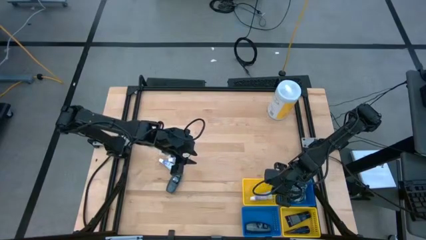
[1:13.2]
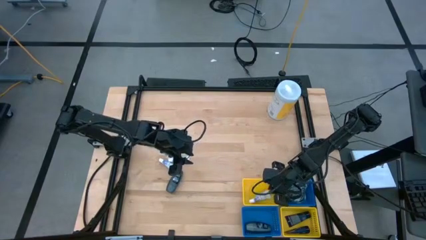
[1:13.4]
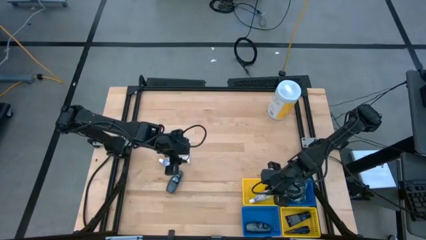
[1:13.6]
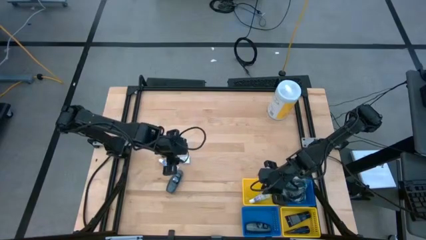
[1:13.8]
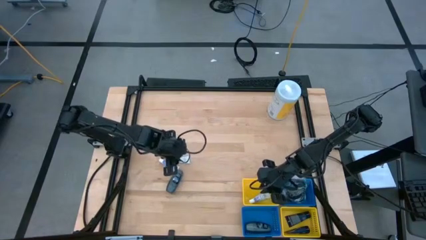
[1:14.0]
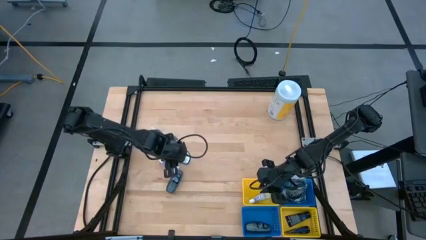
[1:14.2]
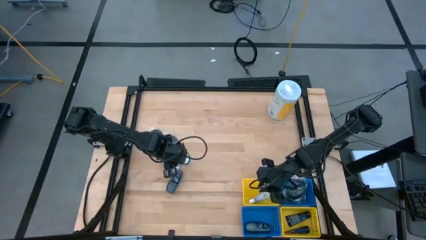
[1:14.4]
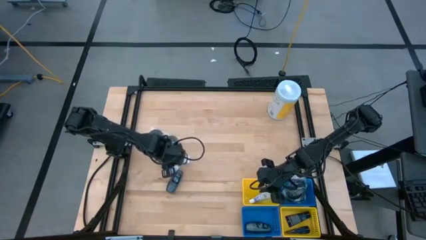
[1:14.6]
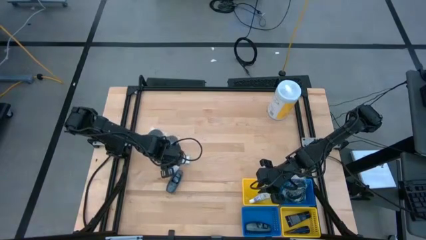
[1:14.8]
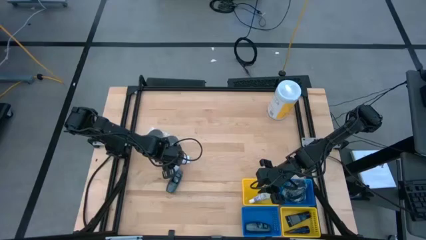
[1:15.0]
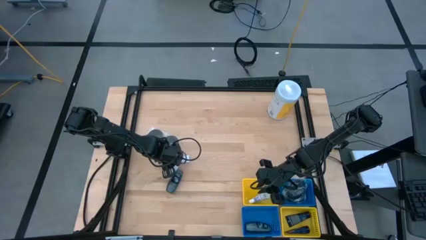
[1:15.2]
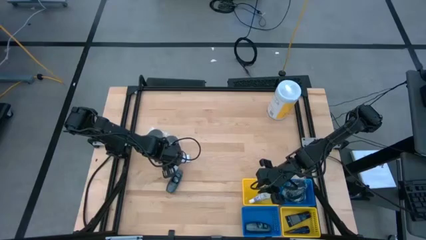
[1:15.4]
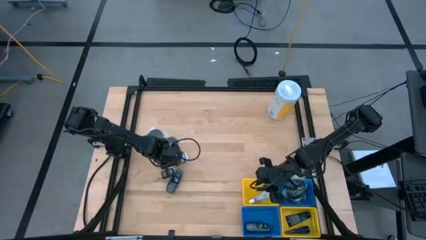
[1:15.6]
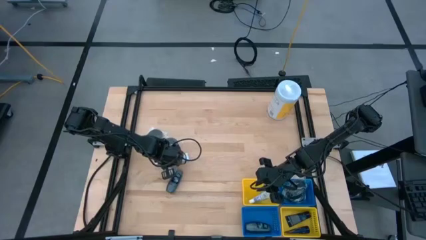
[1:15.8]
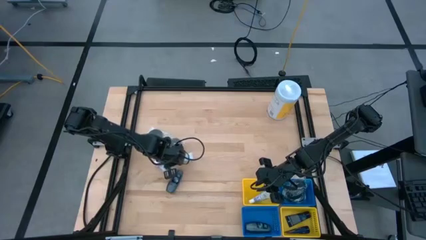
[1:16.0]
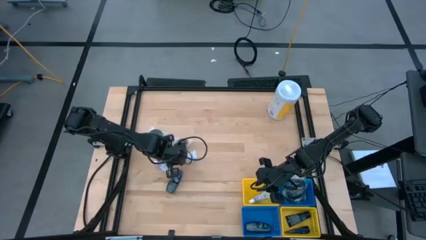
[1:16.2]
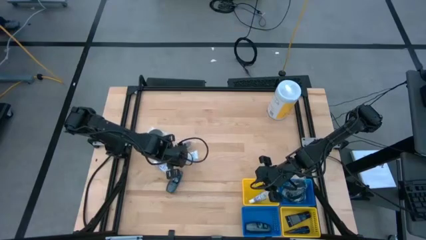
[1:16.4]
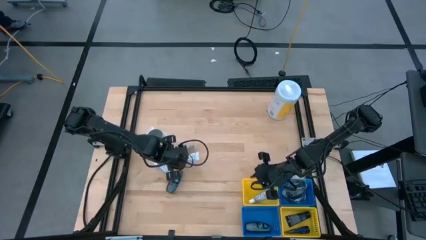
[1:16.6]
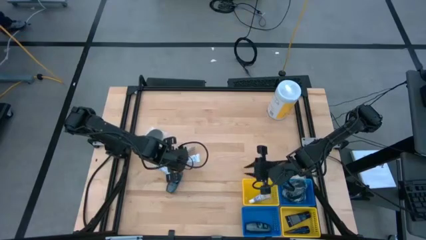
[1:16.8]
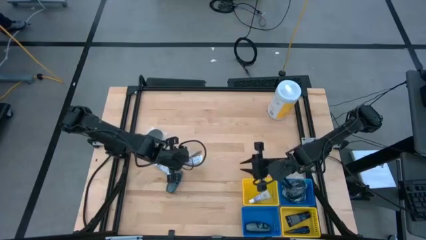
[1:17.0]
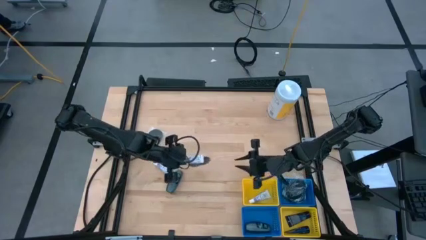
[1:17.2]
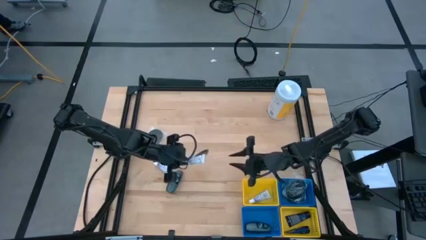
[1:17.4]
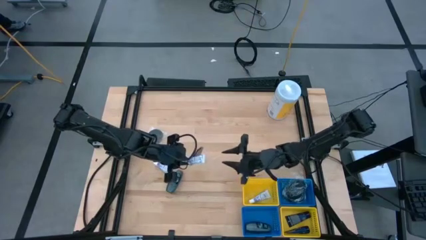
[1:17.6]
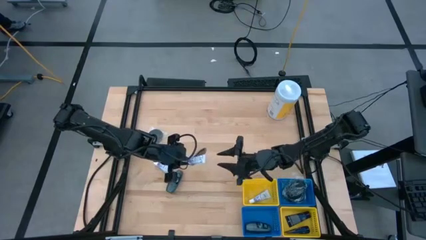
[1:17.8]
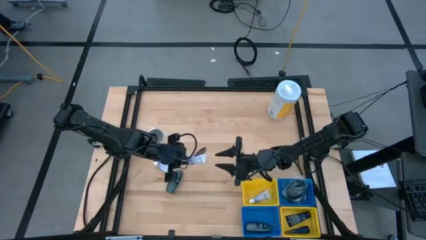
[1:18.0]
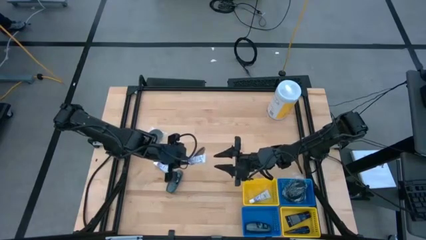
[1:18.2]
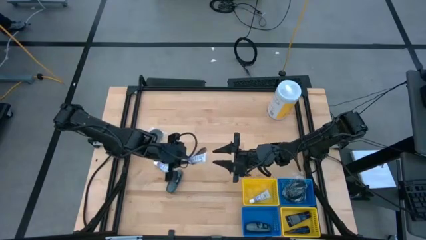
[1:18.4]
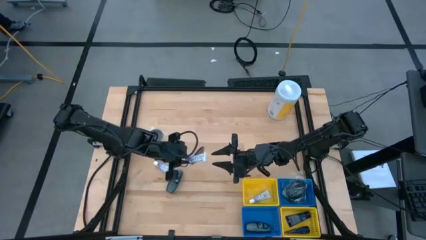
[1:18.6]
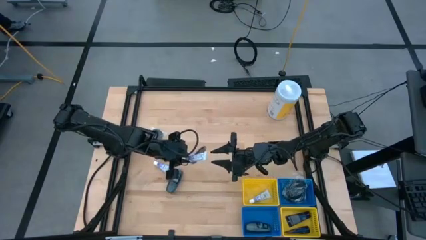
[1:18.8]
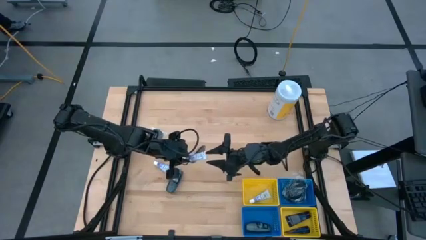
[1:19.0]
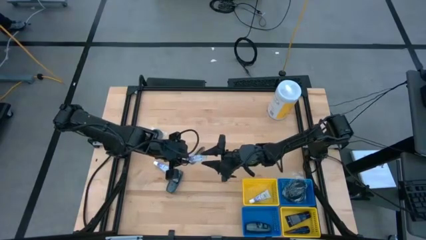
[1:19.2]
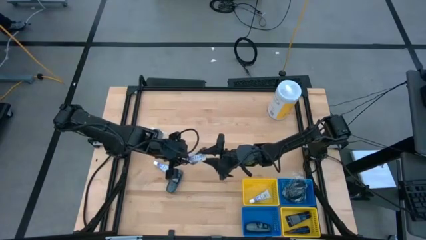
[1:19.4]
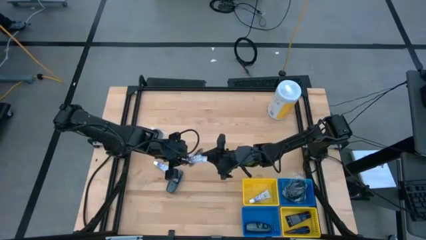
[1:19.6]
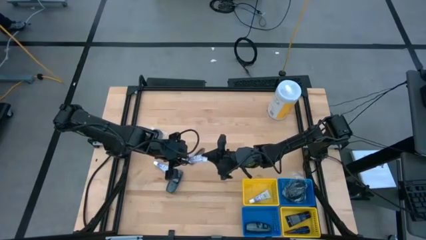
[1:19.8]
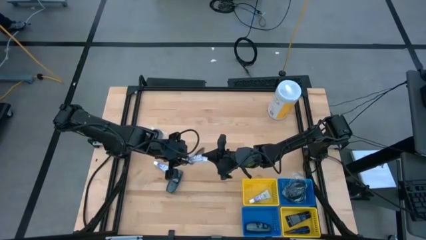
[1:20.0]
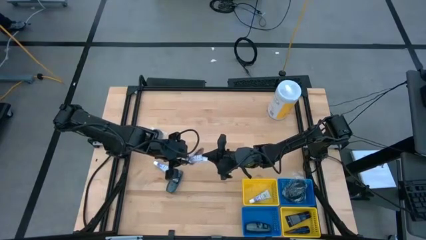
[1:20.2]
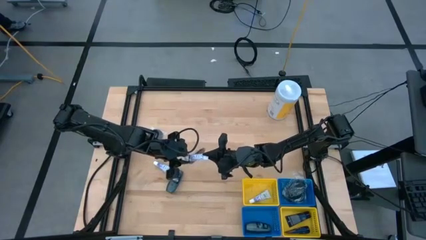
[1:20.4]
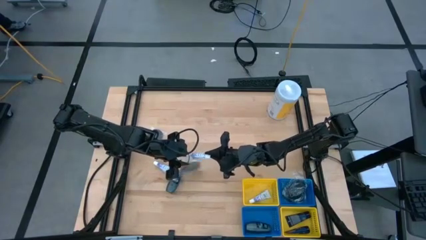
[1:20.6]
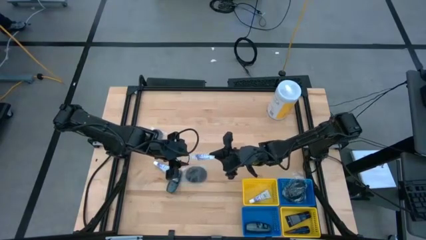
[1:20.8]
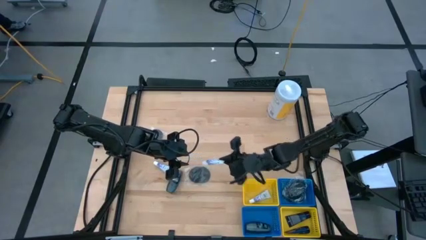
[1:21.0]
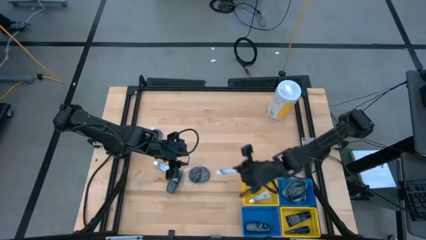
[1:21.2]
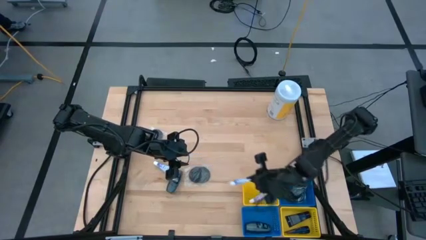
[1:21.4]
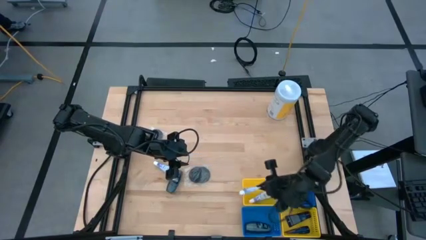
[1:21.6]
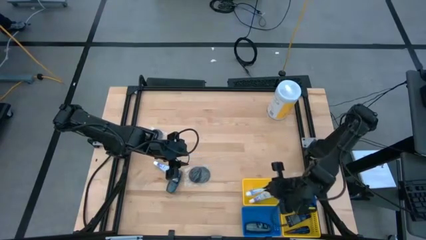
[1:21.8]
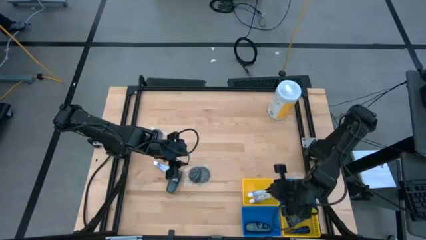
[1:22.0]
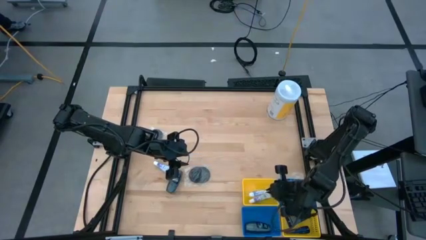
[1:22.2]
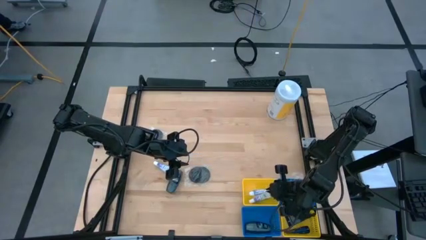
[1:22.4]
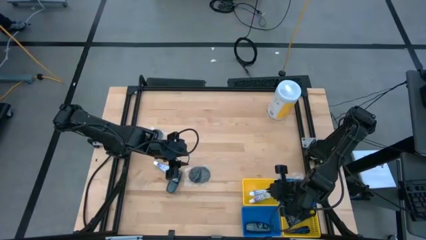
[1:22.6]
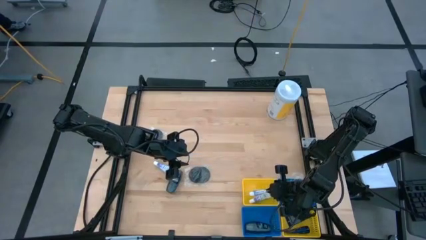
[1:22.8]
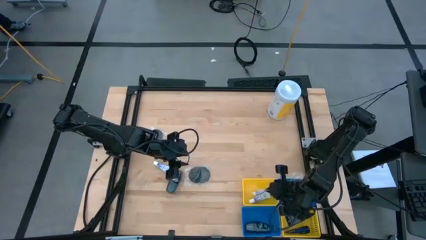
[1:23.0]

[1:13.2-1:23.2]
Task: Pick & Place Travel size toiletries
Put the white toothpaste into the top yellow bin

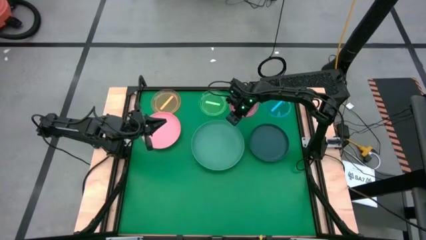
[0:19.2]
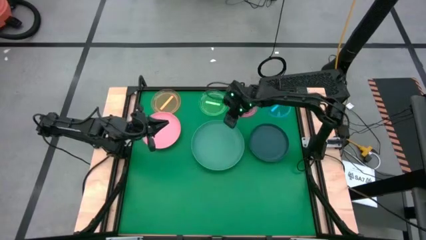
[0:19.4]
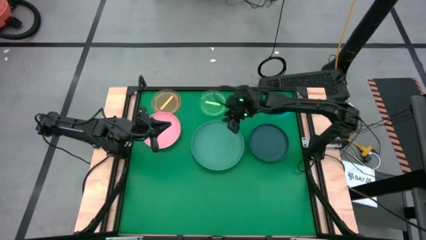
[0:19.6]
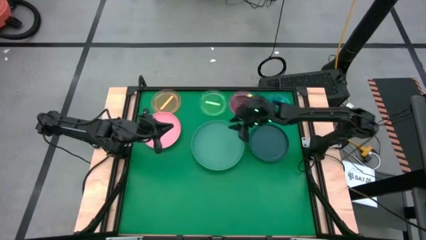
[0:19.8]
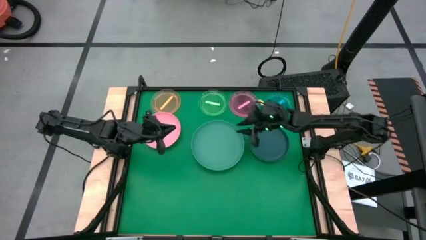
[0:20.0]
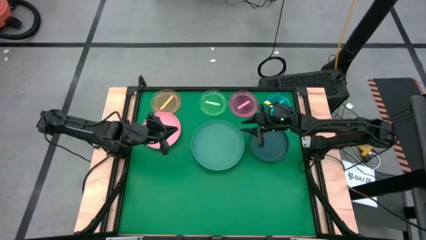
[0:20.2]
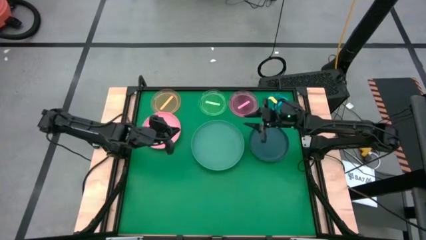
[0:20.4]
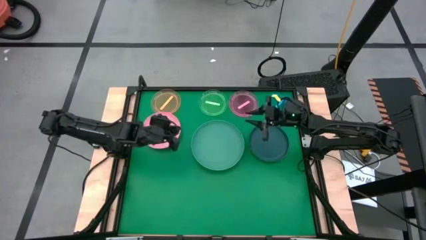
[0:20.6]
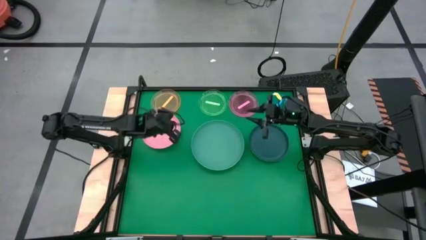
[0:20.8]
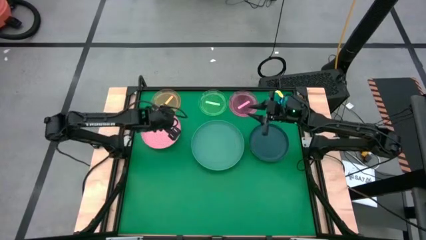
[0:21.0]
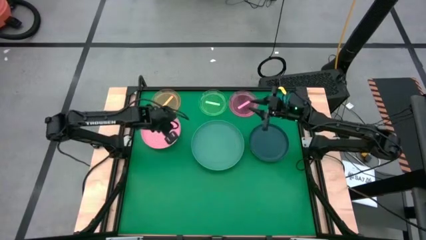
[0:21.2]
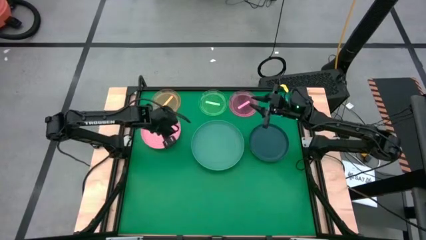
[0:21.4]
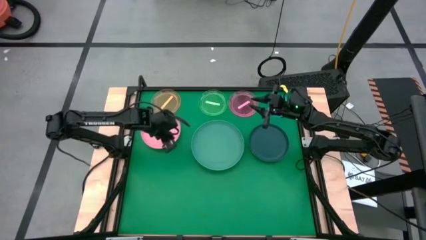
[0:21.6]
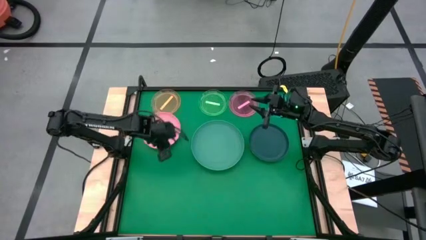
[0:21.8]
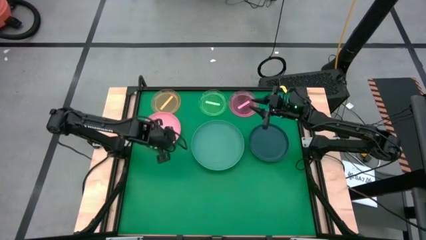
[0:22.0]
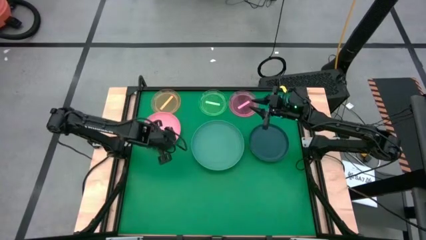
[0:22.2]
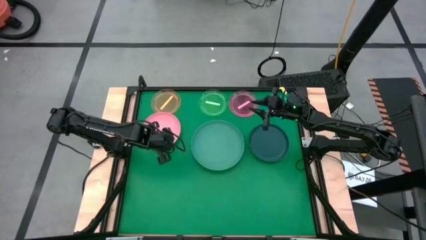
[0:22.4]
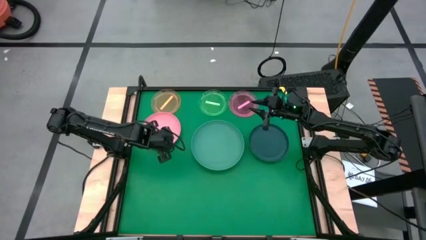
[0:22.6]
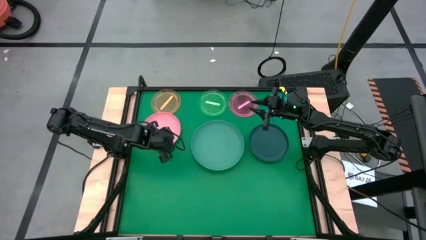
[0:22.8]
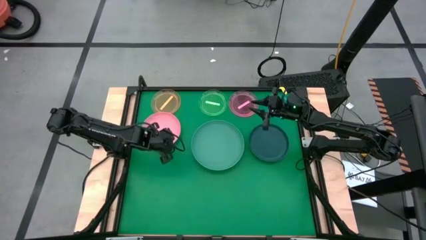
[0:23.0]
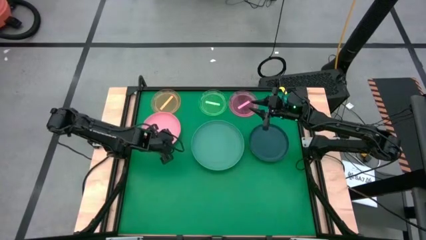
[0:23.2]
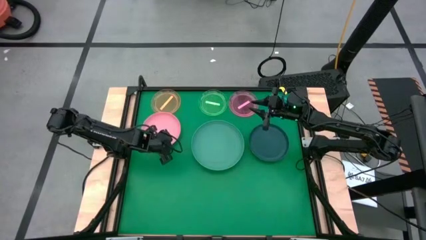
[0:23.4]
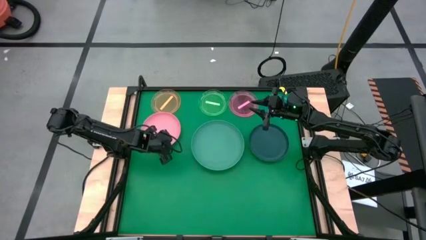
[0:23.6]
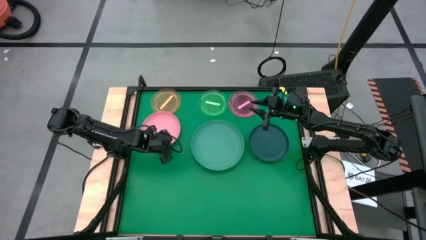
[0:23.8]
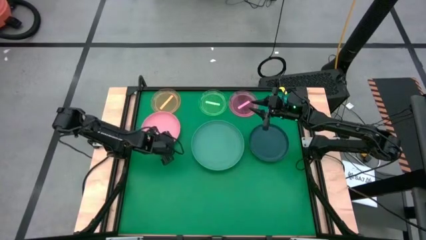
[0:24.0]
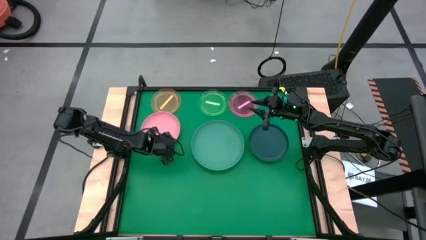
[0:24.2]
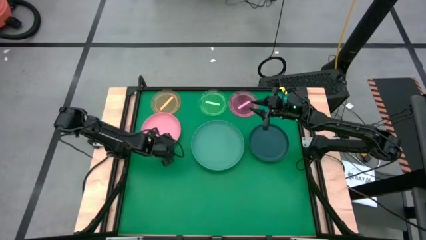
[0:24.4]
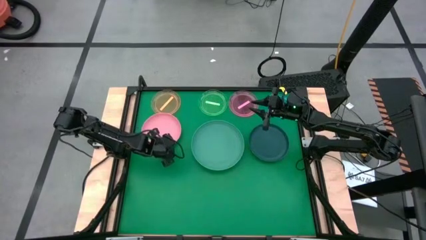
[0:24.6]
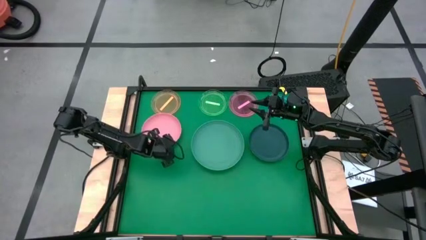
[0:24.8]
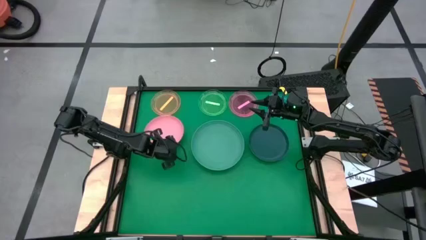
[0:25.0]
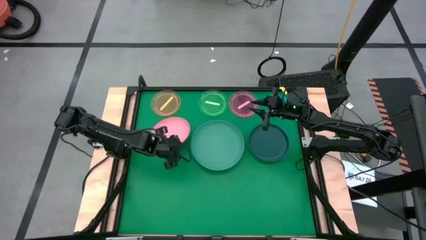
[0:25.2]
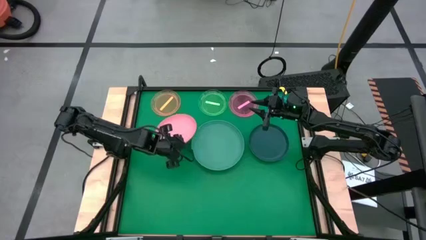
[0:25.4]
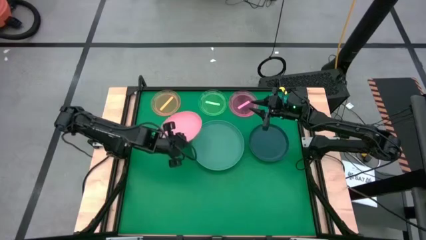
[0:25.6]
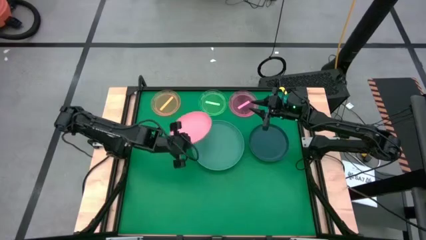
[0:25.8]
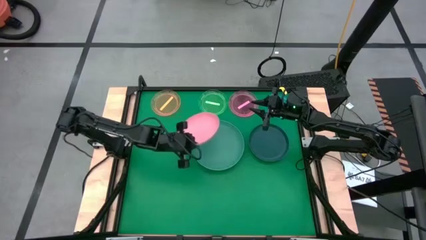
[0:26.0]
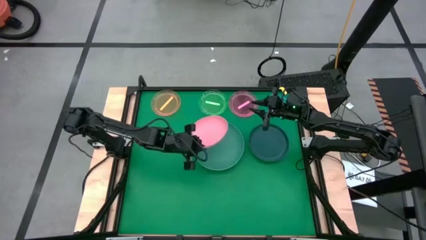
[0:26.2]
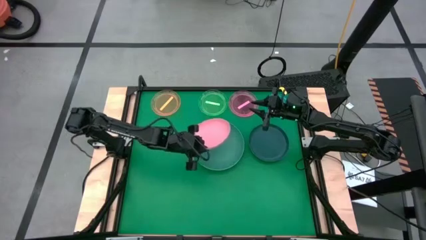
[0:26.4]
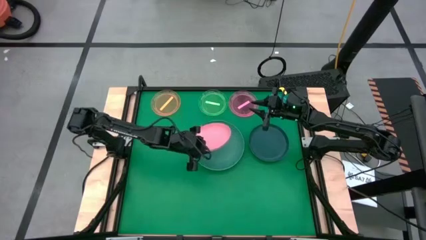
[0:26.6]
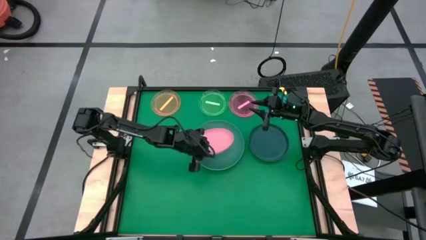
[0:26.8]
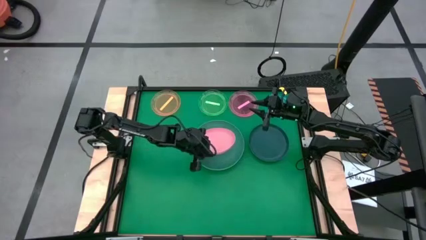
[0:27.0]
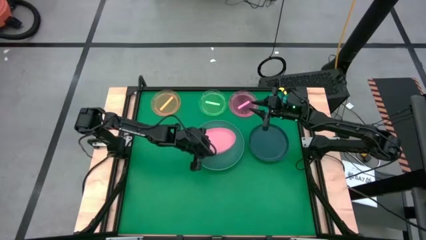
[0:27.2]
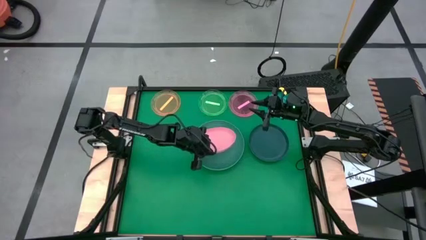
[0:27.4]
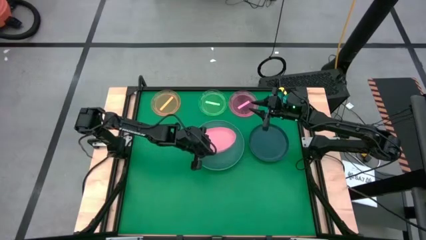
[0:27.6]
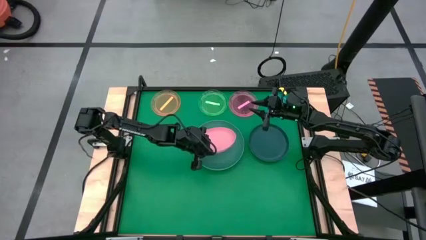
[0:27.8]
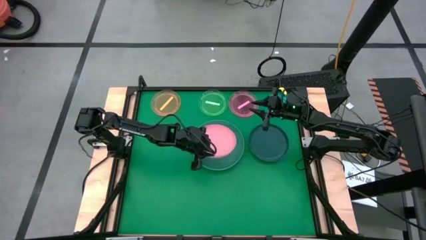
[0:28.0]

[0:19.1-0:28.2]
Task: Stack plastic plates
Stack the pink plate on top of the dark green plate
